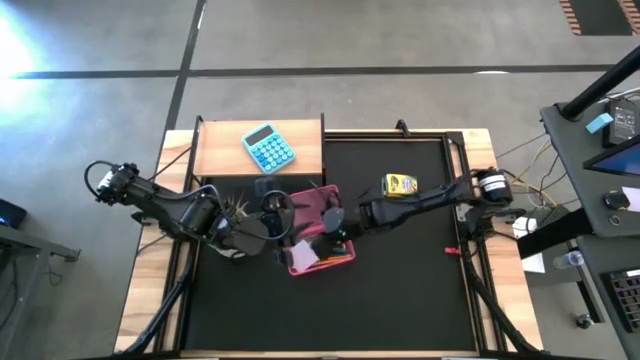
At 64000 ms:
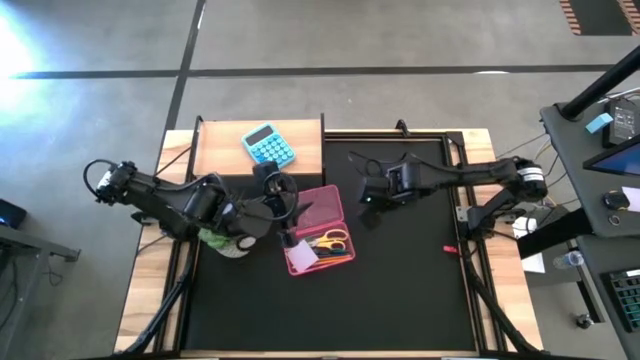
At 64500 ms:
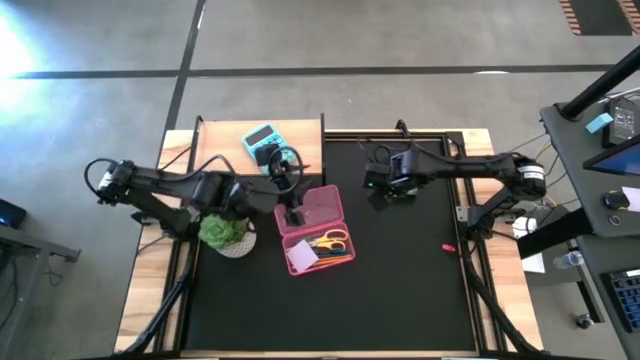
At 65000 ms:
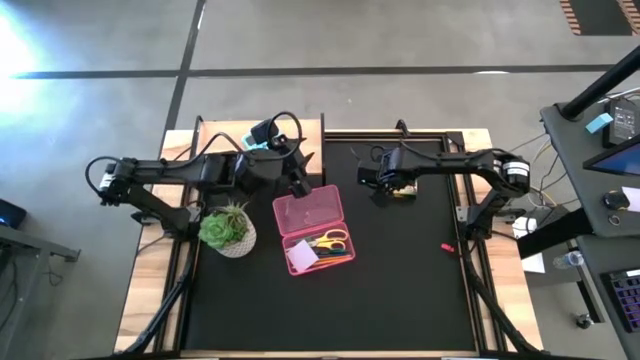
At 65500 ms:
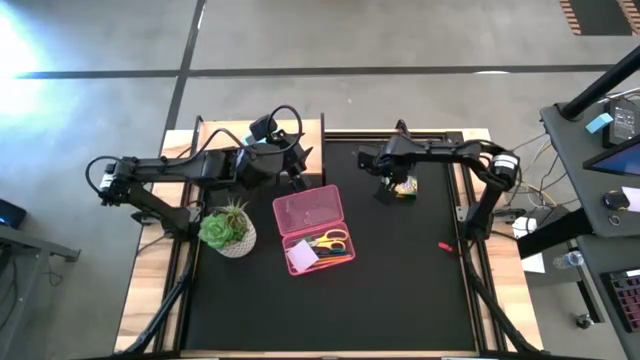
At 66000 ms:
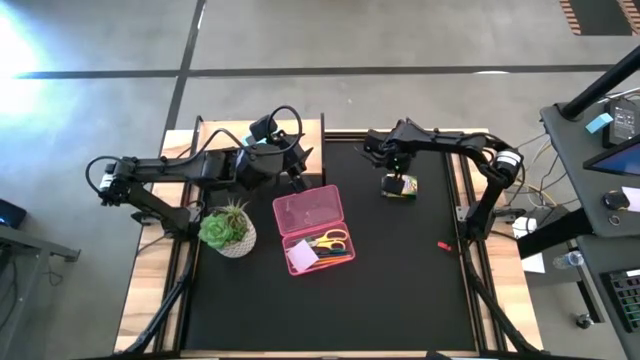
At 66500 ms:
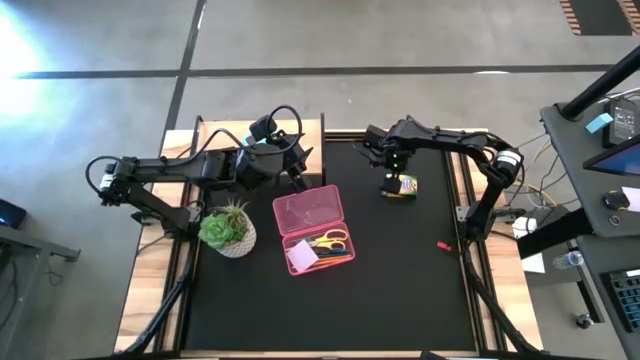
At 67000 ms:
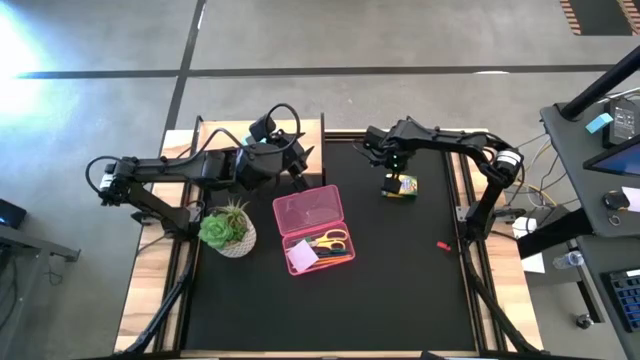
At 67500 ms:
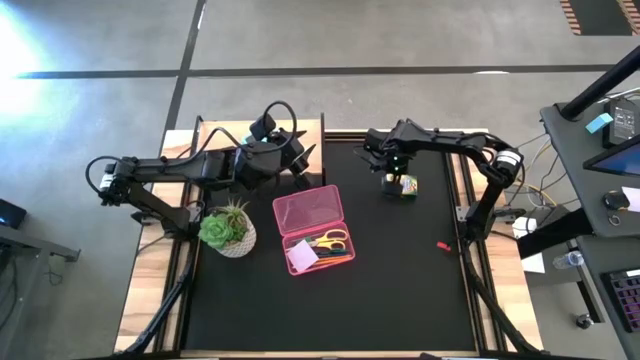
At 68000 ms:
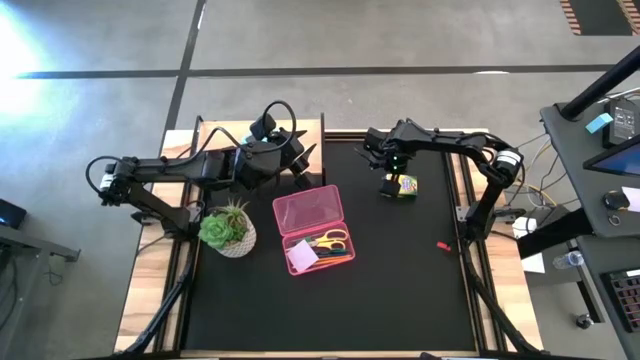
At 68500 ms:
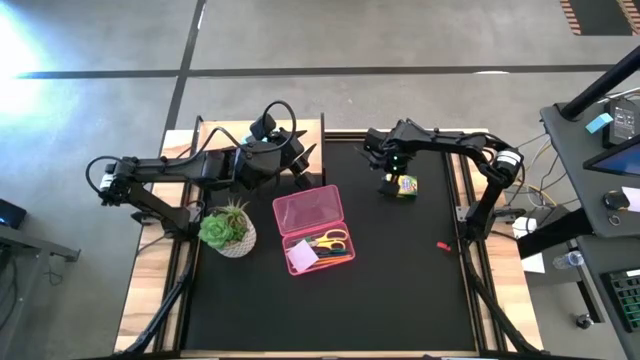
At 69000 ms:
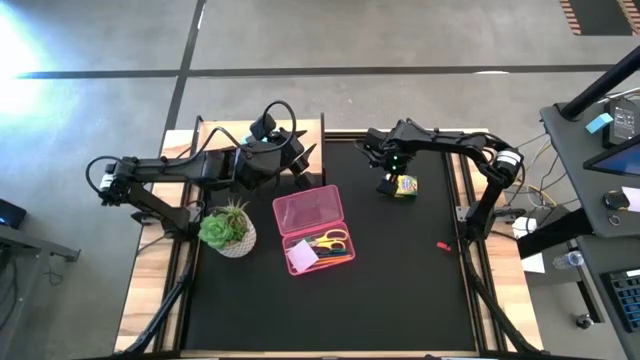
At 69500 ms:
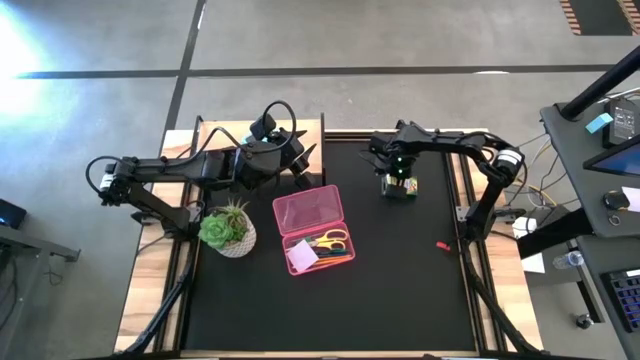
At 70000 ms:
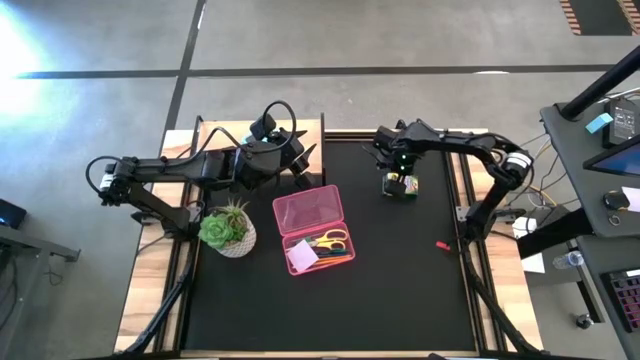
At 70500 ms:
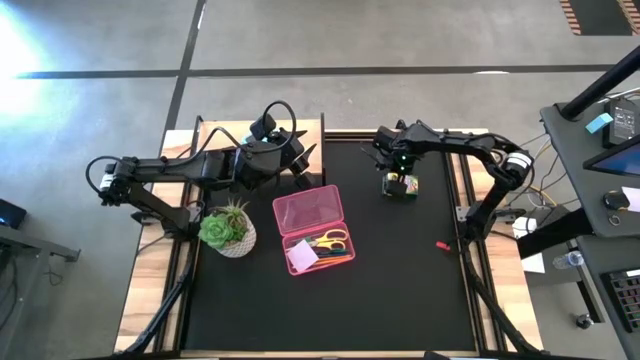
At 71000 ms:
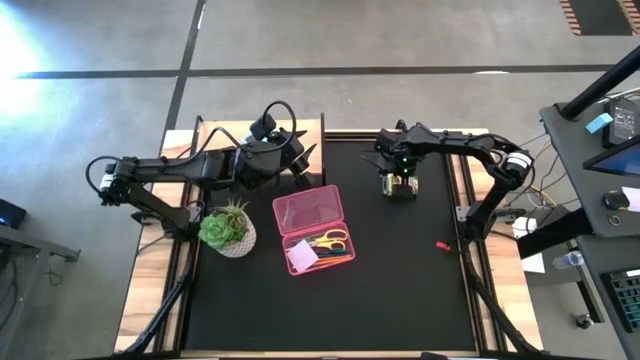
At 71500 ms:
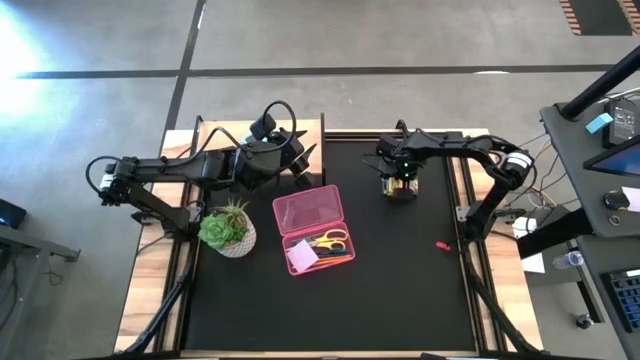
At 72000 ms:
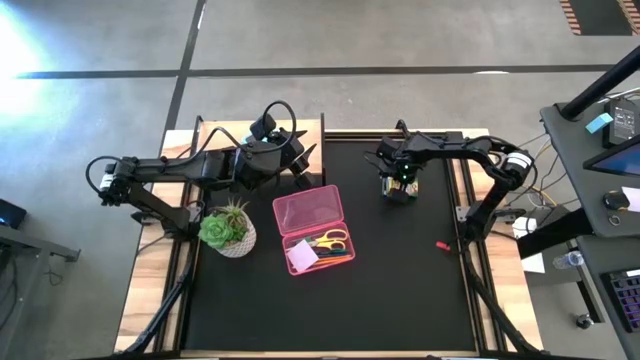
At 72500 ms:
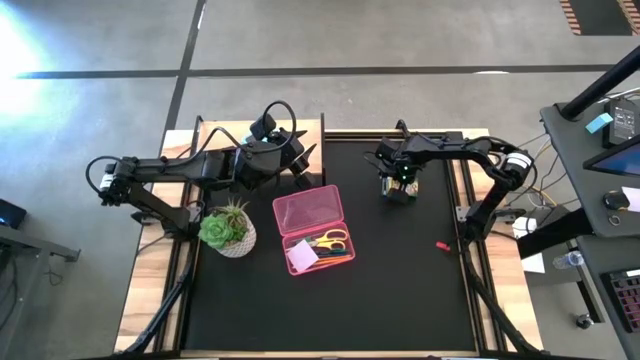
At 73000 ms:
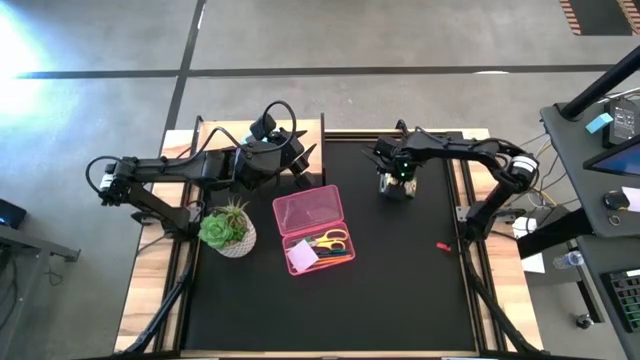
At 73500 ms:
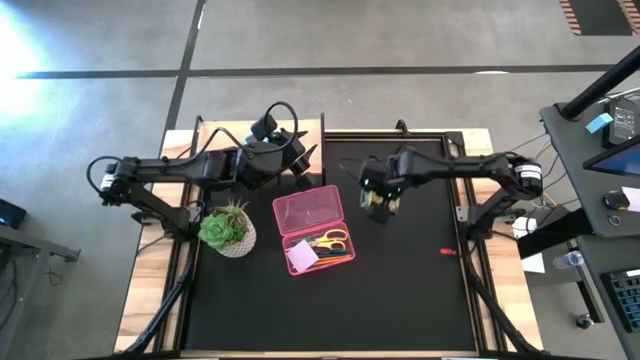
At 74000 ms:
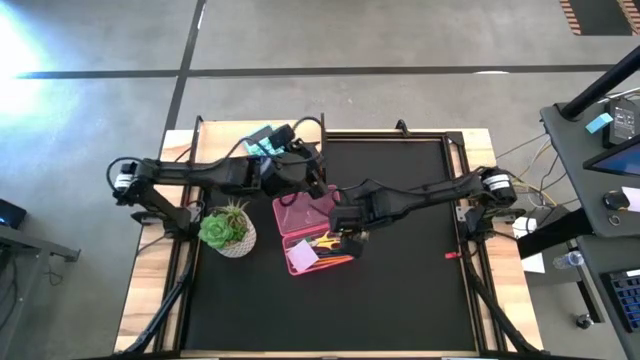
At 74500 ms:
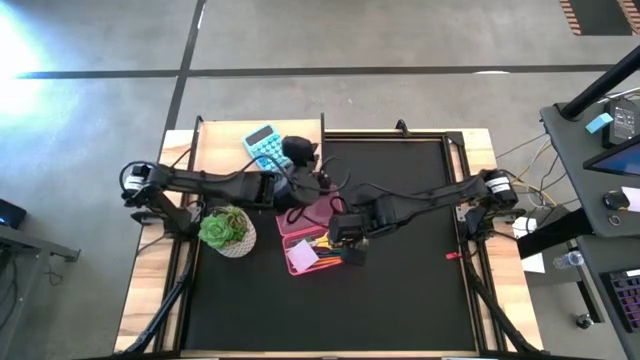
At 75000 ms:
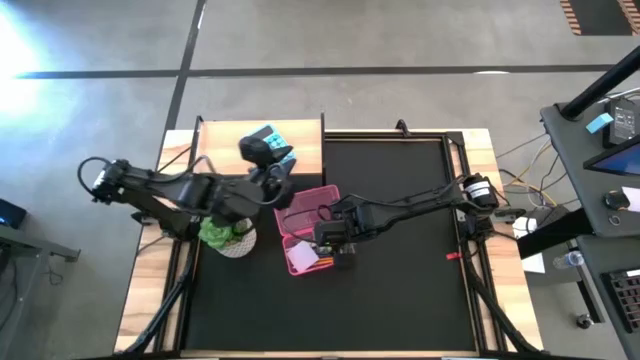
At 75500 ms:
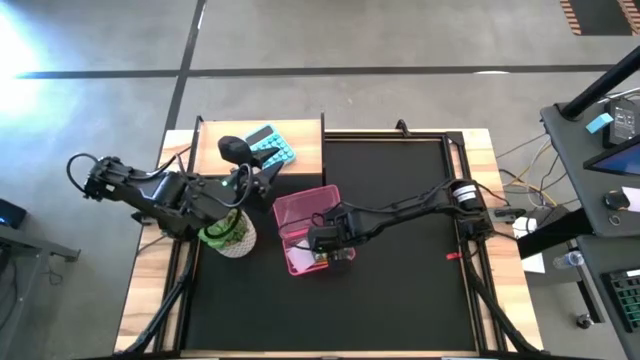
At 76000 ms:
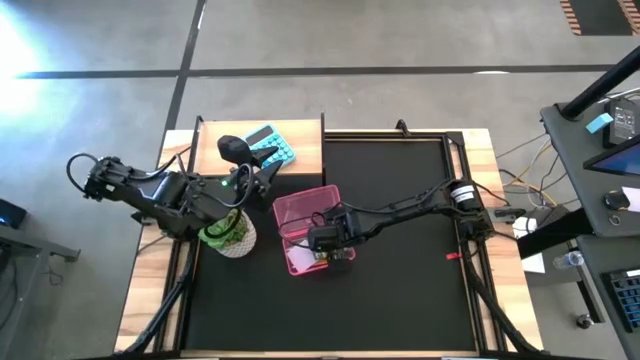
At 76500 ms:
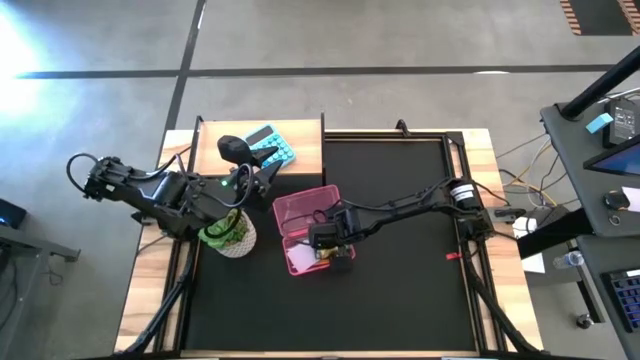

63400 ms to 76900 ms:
Task: Pack school essentials
Put the crayon box into the pink box

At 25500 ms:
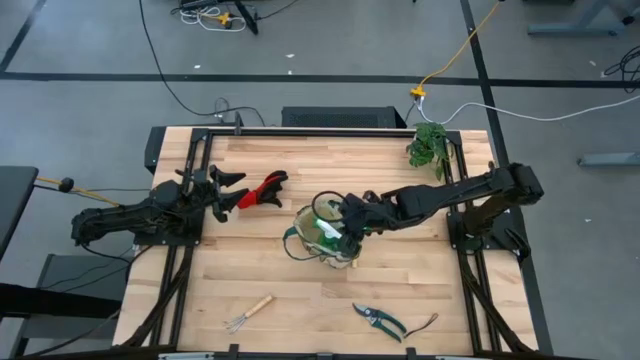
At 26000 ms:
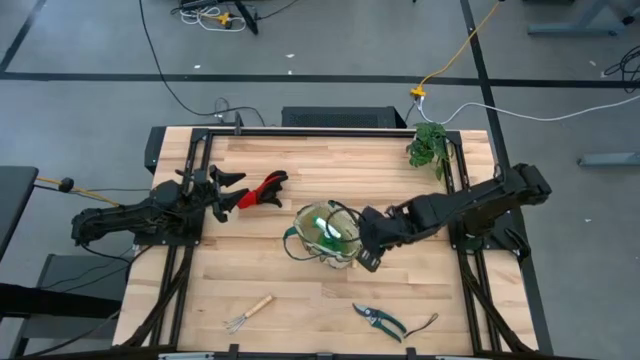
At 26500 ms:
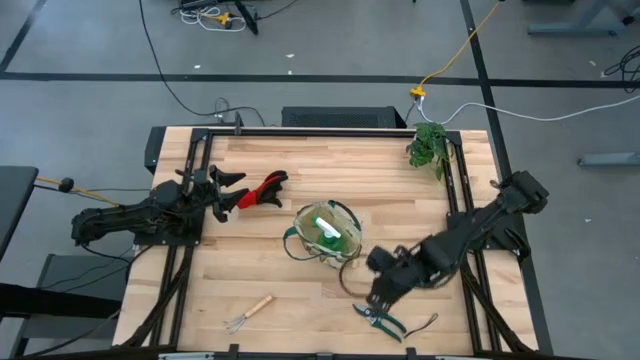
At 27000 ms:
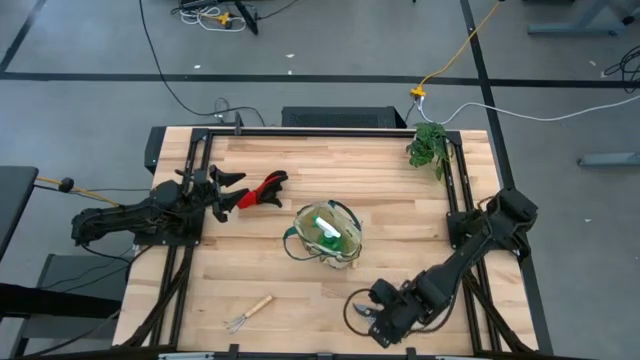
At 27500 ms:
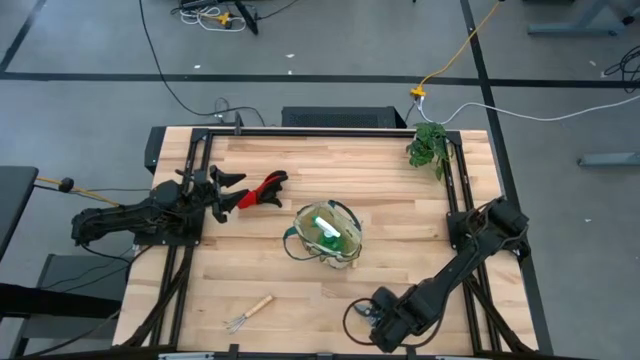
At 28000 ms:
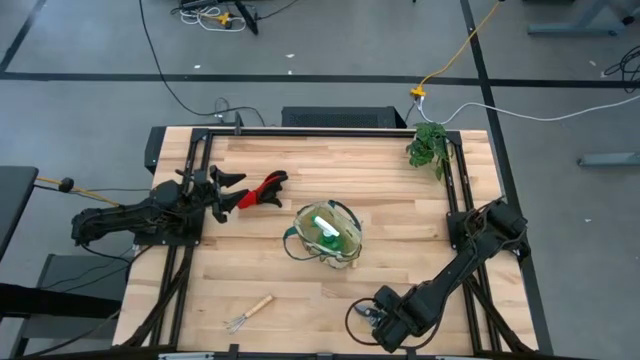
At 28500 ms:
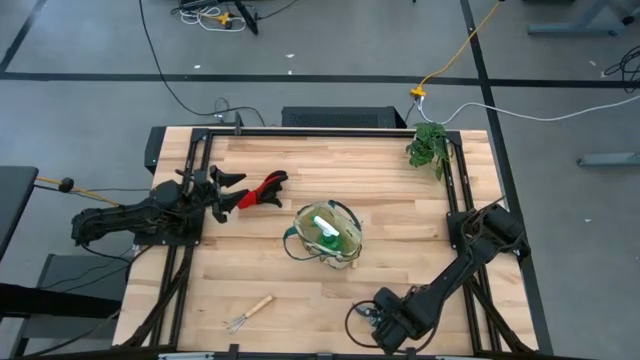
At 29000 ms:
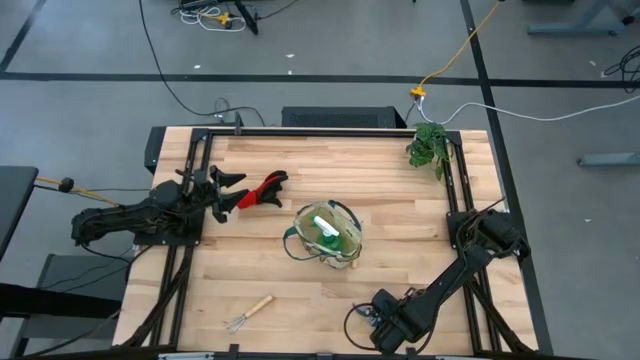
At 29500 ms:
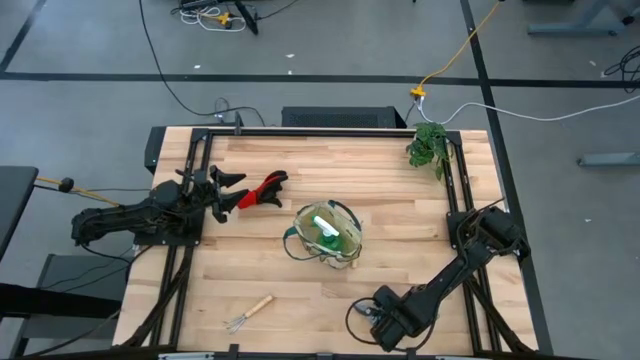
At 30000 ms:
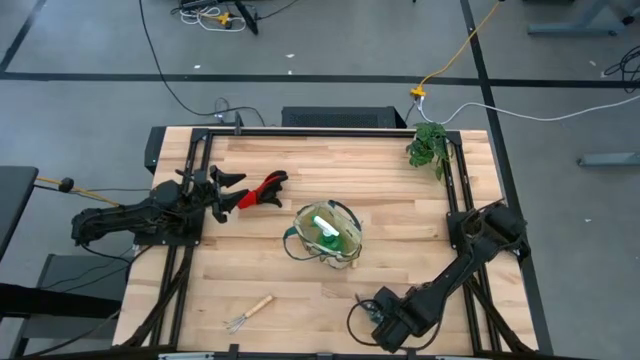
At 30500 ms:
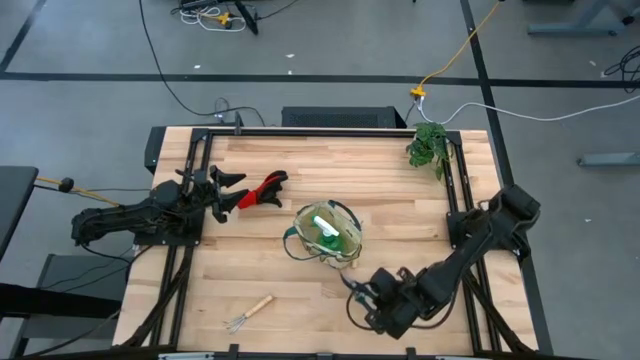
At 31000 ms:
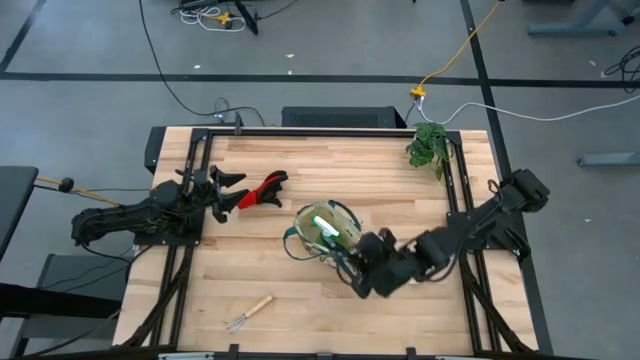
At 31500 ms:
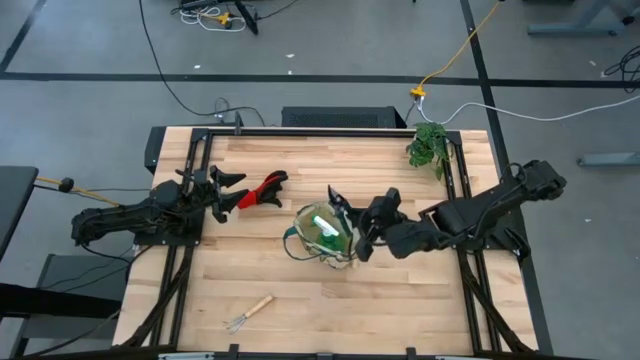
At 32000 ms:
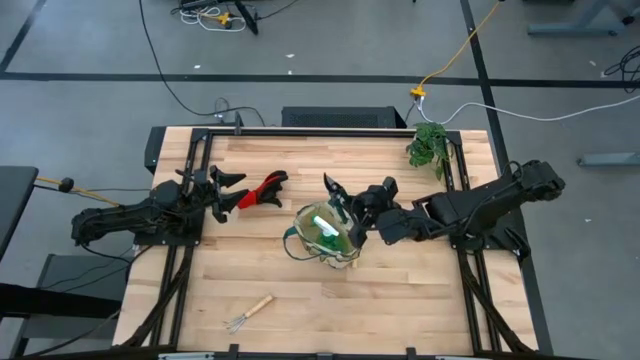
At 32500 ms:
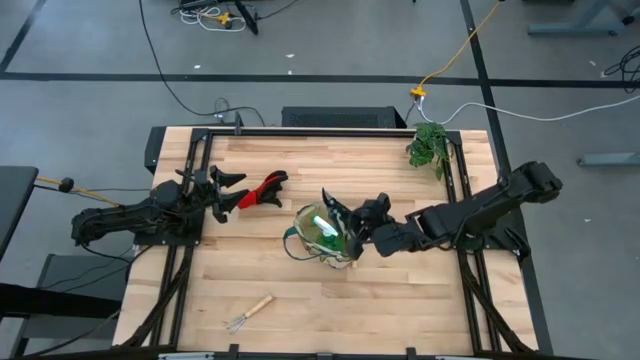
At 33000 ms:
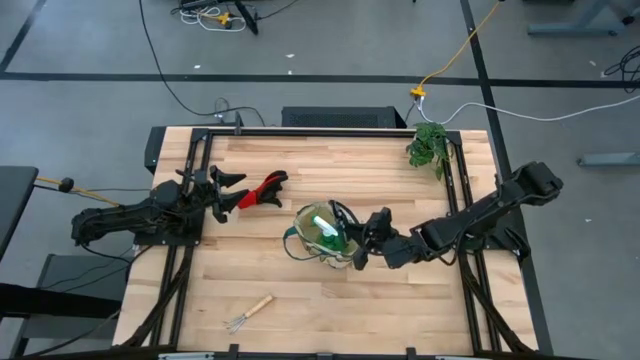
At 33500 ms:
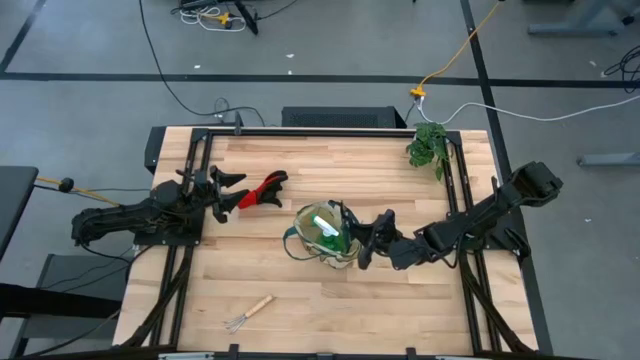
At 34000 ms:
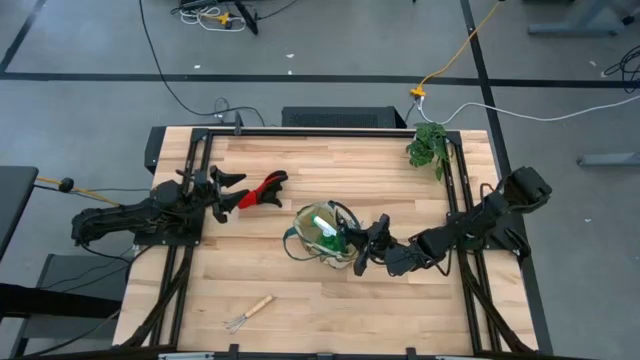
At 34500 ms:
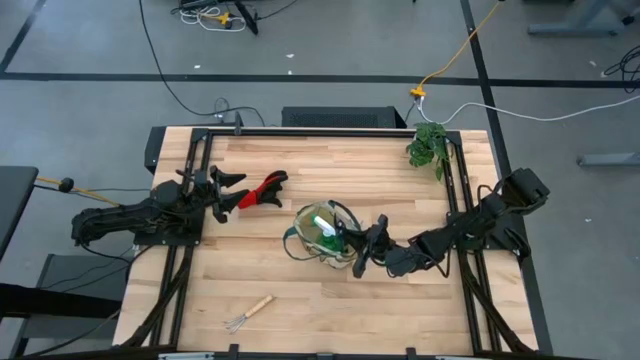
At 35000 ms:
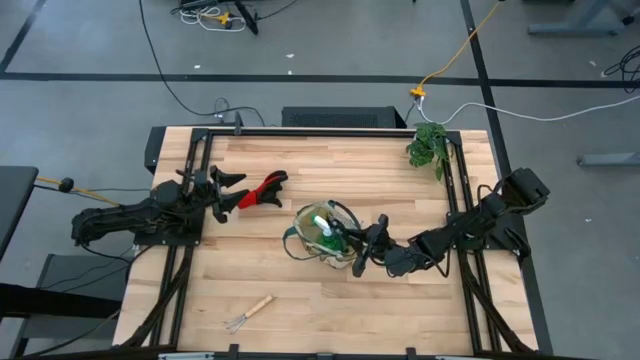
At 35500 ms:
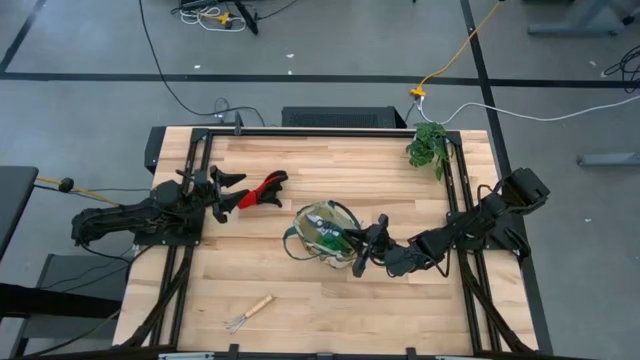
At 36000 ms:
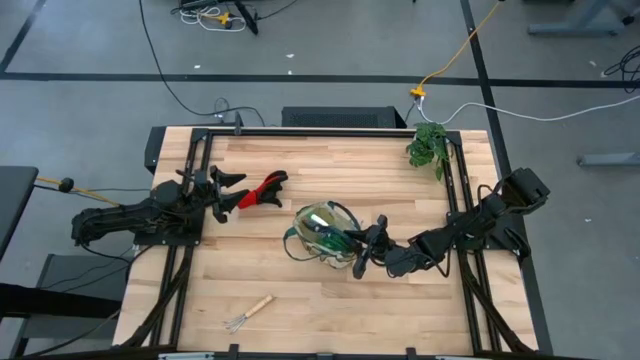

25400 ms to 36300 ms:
Task: Pick & Place Garden tools in Gardening bag
Put the dark green scissors into the white bag
